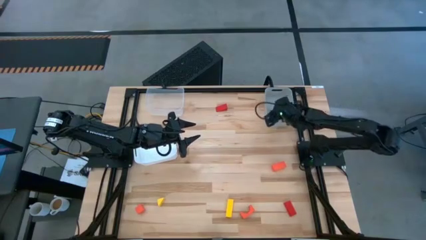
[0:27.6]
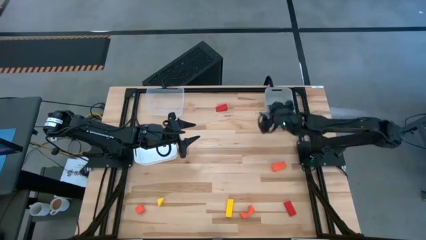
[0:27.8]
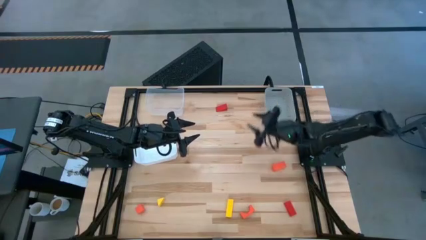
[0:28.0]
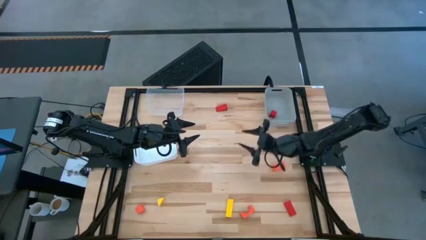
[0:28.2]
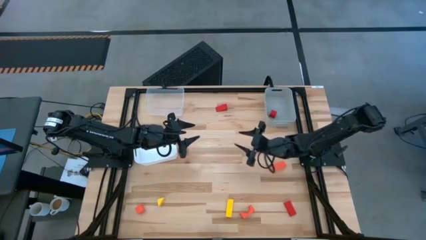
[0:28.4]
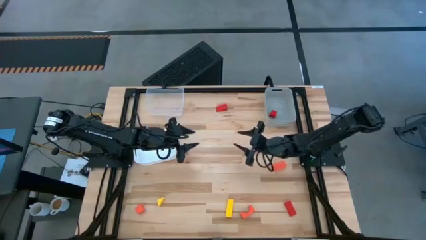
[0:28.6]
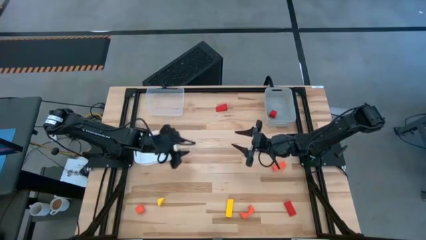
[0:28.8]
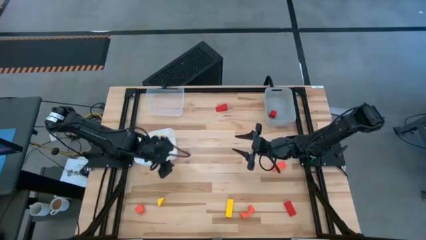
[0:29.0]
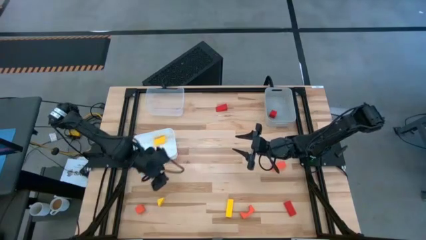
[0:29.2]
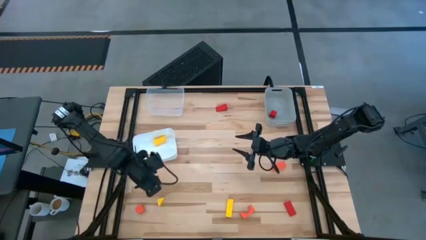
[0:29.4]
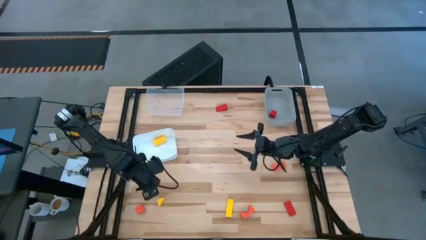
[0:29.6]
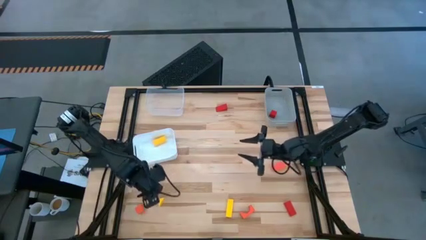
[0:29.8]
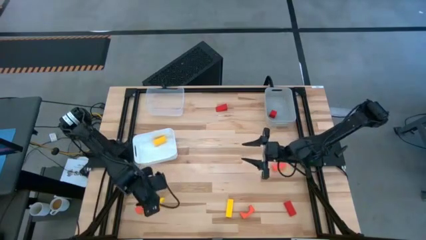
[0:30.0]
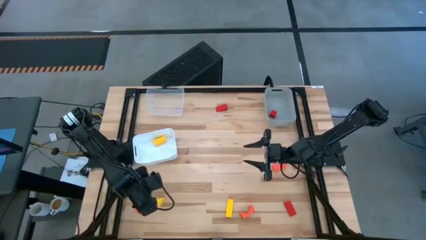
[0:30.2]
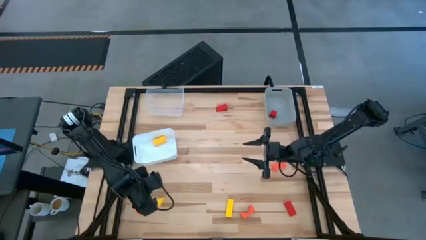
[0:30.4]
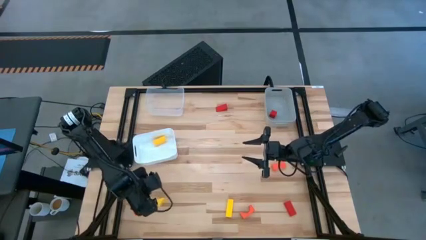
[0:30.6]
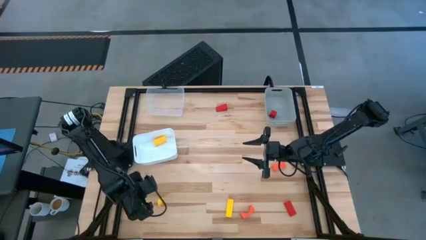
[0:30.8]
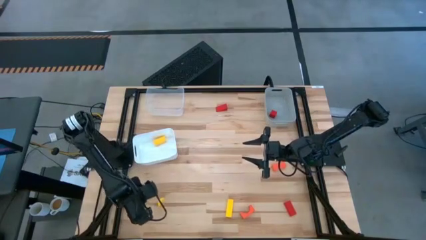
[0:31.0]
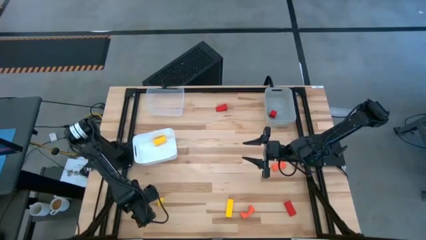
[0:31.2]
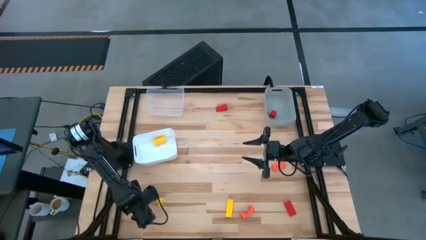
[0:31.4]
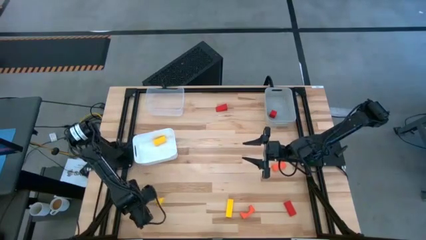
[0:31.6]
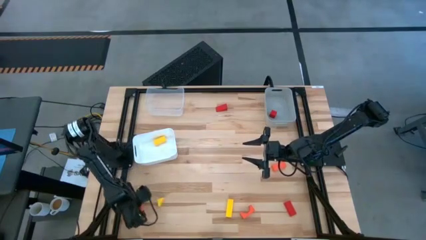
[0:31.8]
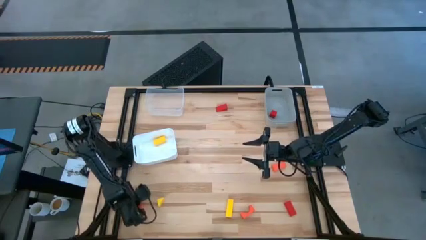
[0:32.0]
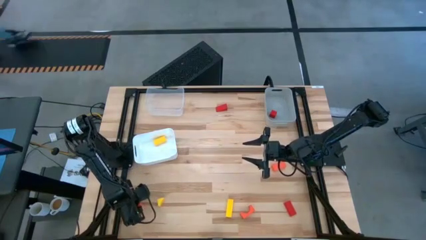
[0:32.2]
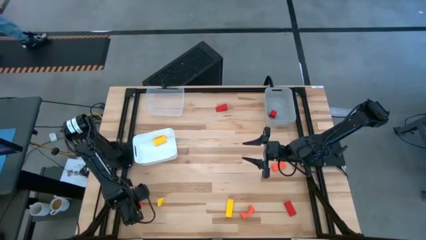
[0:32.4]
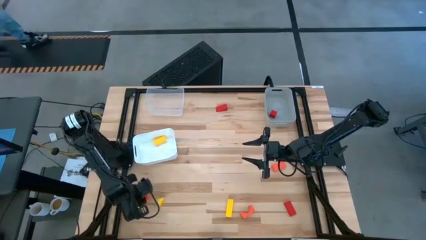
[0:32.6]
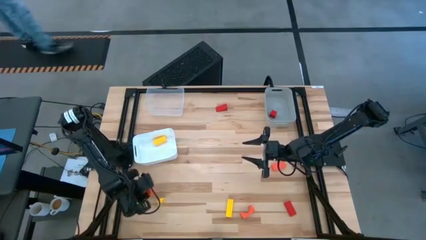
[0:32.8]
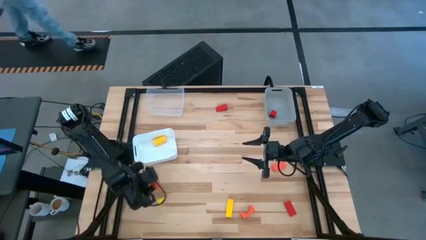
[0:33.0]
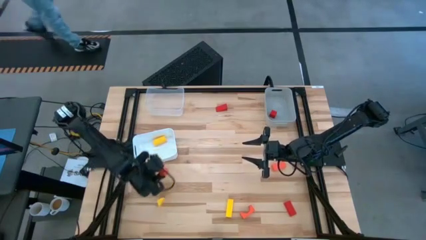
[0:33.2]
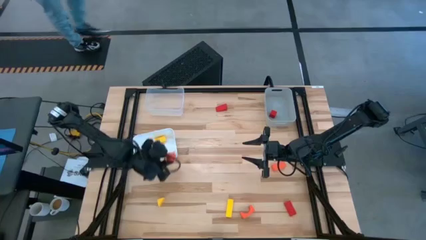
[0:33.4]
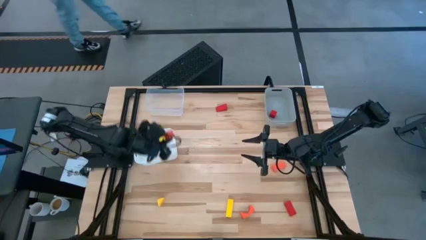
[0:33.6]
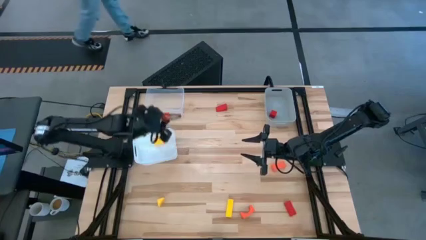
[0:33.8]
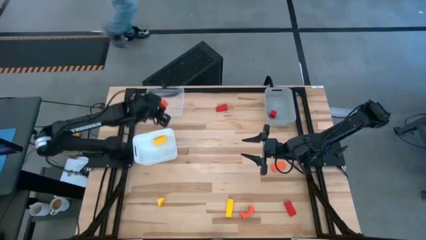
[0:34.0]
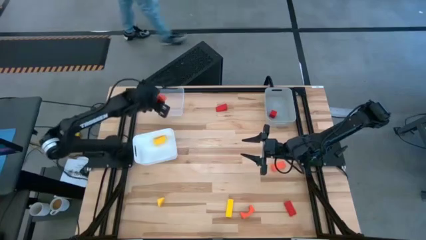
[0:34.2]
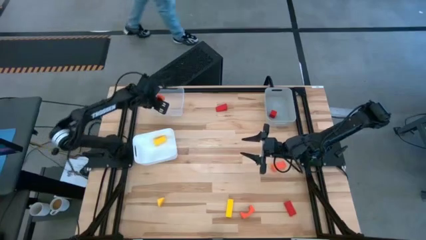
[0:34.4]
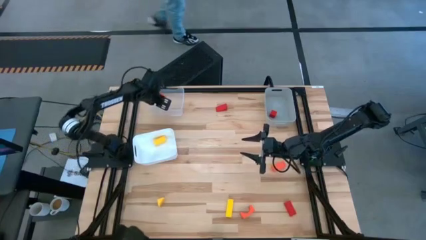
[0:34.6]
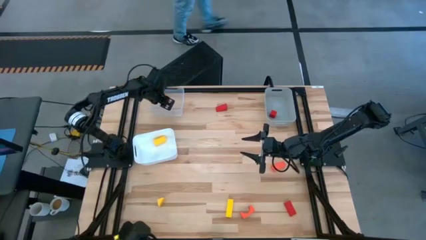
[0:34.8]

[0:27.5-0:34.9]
Task: Sort & place blocks by color
Put the bottom left orange block into the transparent bin

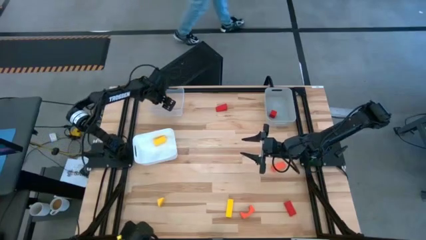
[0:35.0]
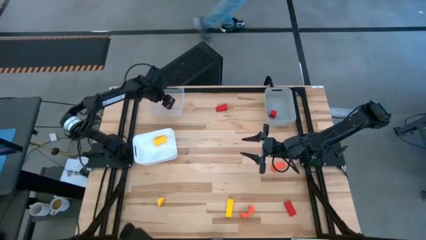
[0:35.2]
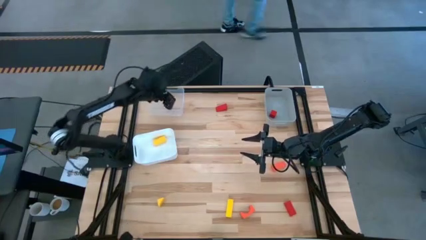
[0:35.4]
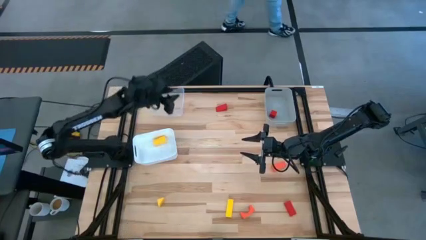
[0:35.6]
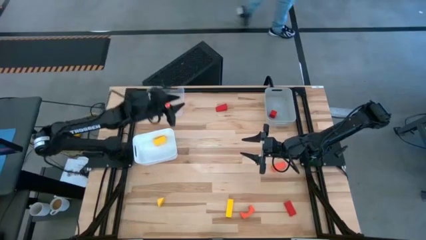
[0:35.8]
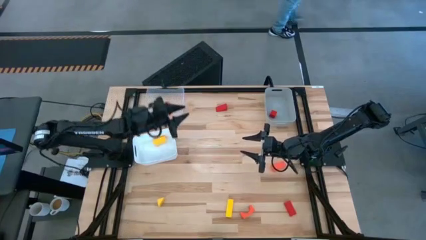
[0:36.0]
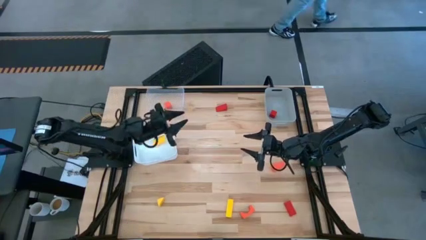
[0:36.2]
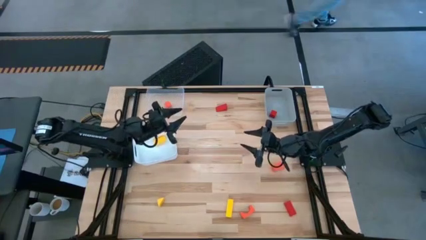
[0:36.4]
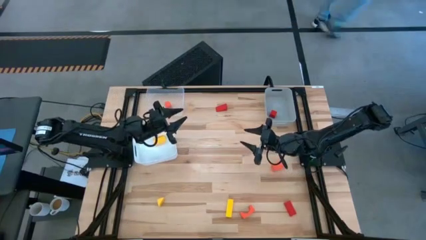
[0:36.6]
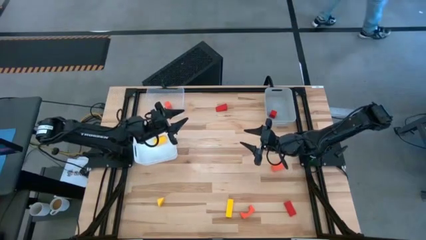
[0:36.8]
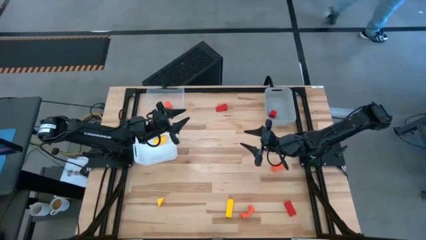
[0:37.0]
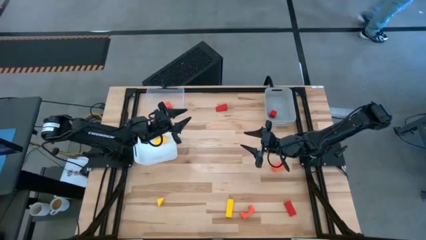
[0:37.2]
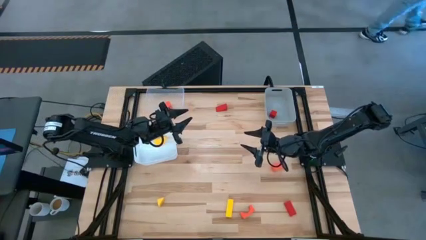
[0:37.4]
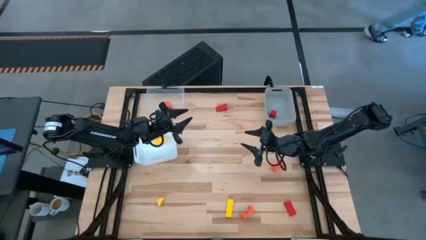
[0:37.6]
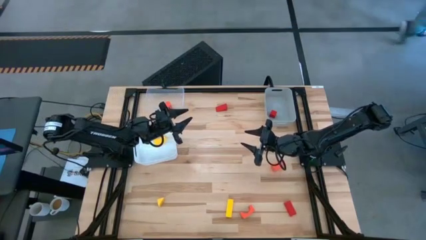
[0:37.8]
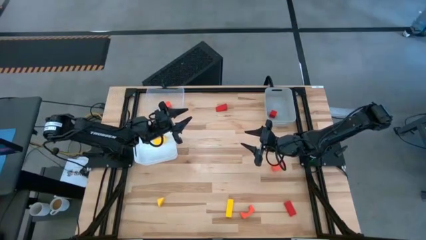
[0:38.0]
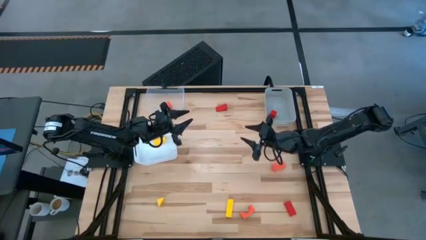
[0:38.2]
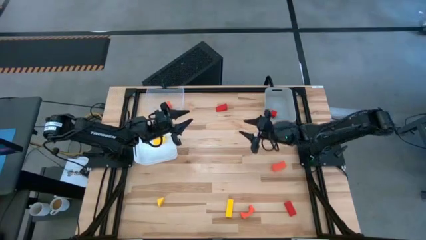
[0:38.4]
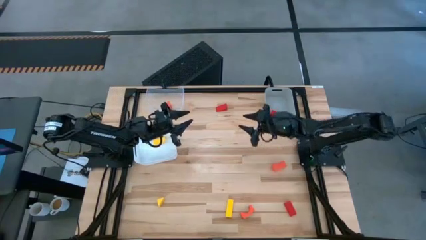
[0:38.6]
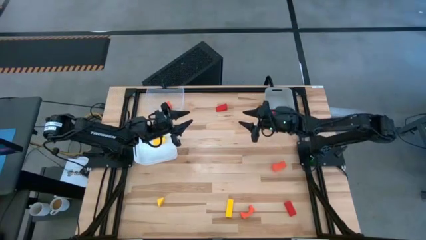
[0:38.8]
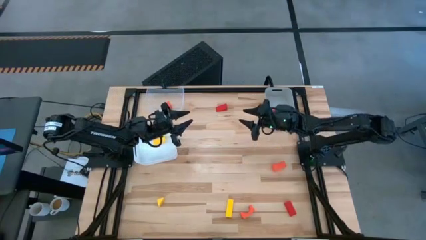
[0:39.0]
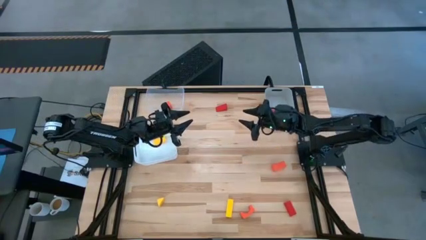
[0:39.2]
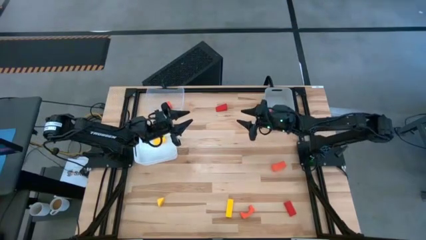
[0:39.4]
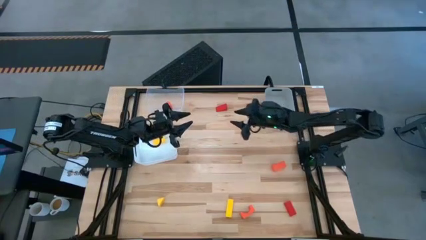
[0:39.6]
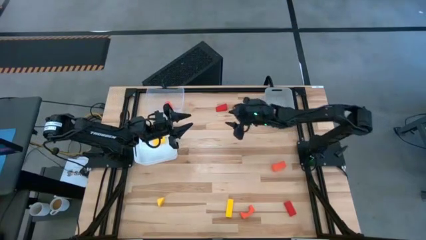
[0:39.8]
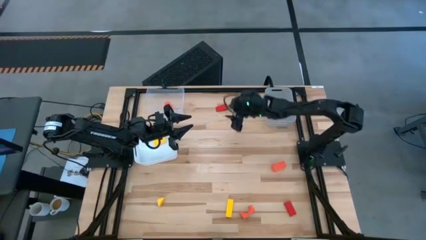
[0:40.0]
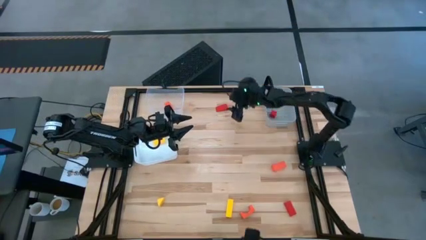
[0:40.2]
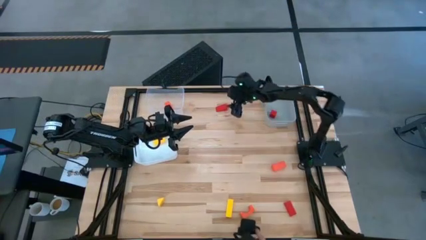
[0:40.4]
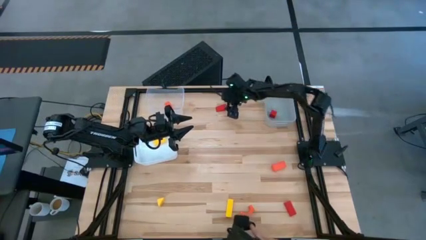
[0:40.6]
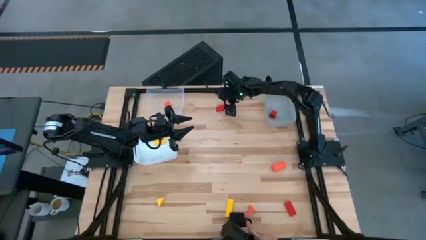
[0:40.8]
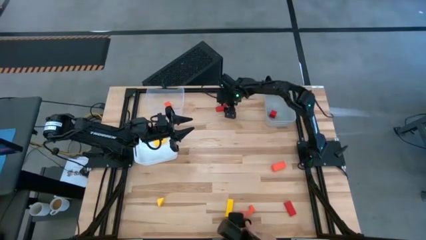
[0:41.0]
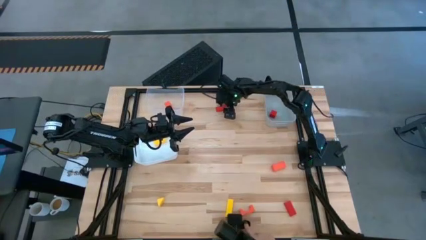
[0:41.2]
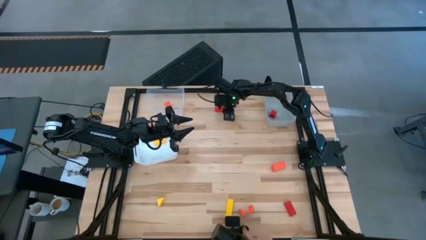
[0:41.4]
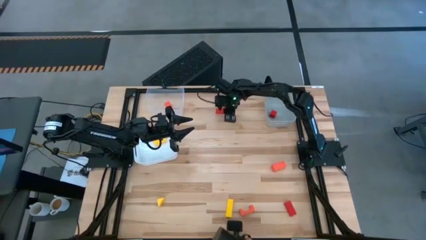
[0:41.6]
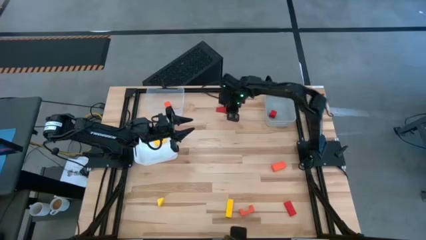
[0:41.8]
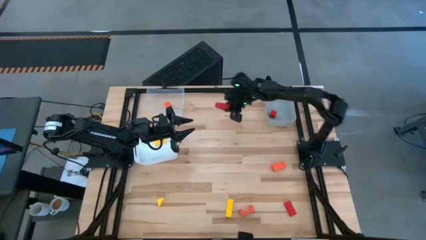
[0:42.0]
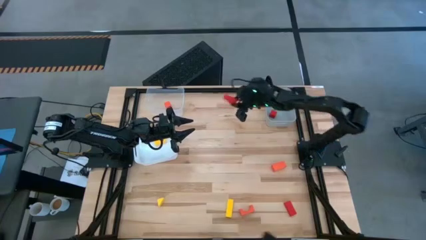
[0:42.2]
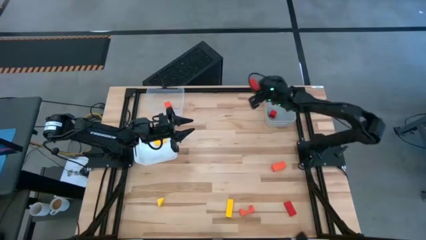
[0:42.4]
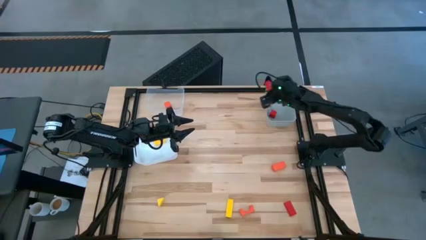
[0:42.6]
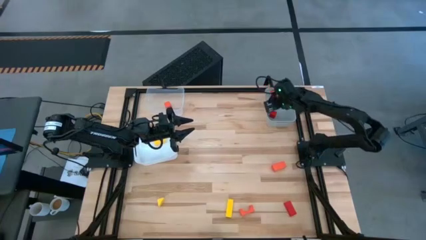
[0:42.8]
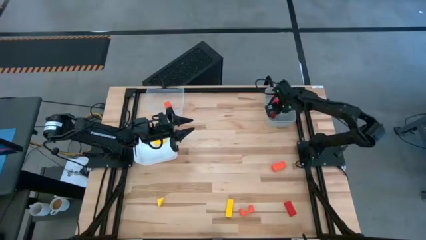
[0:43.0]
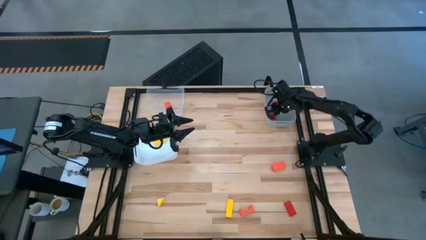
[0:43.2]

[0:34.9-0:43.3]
Put the top red block into the gray bin

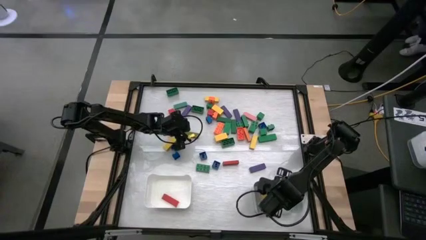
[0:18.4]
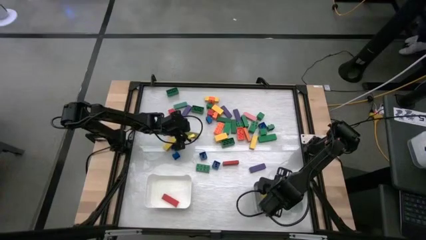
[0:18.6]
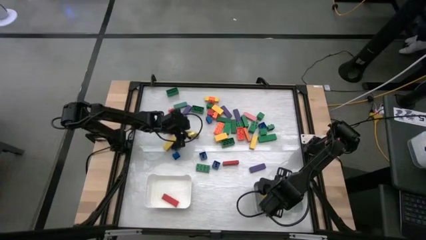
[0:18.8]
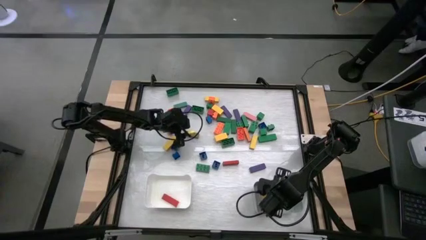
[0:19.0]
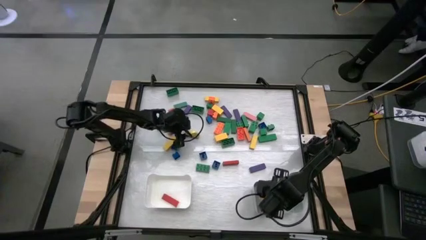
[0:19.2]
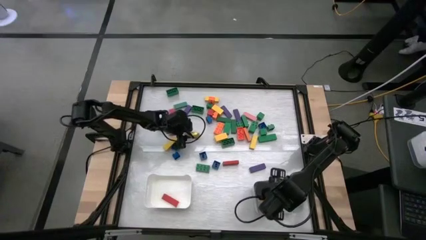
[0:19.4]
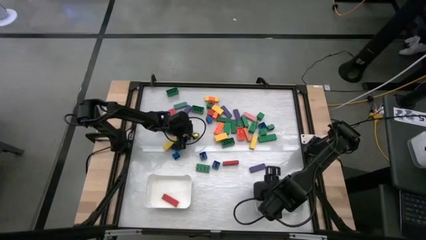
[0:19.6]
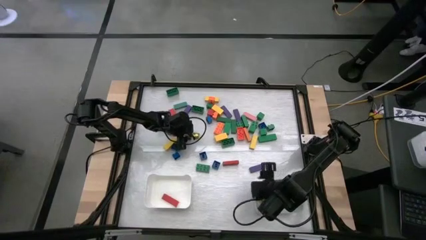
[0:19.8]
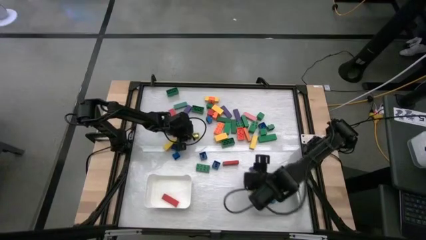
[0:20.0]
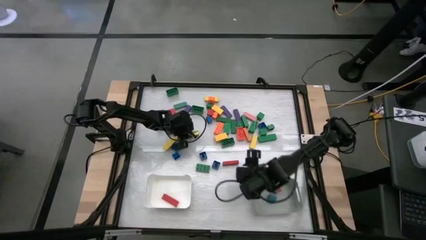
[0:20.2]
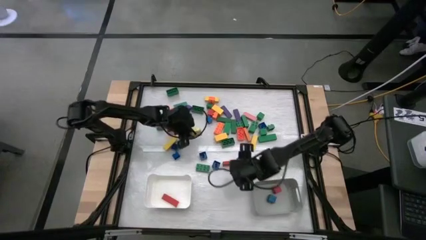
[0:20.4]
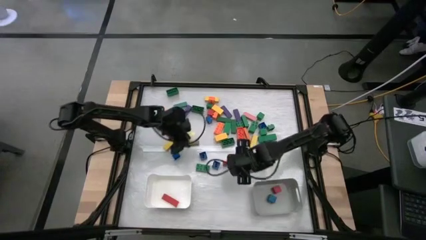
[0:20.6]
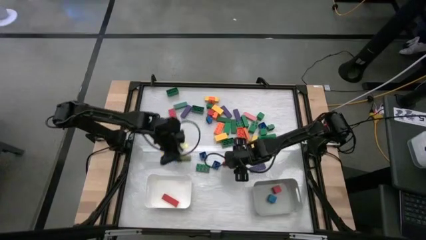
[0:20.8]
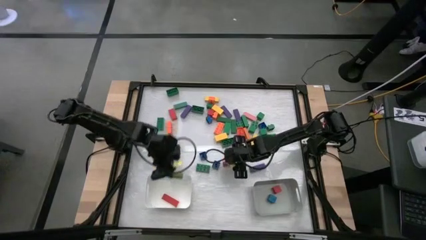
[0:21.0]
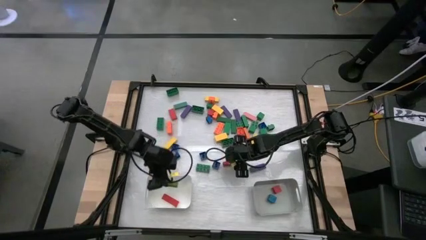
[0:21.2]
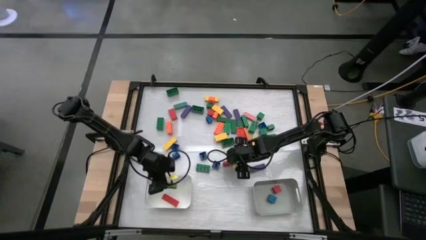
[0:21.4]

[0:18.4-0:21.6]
Task: Sort blocks by size
Put the rectangular green block into the white bin
